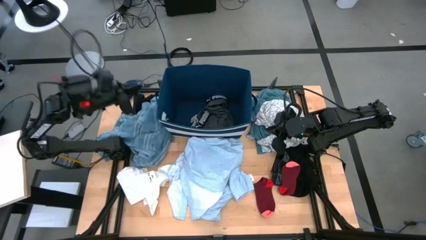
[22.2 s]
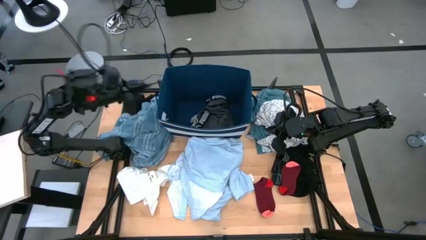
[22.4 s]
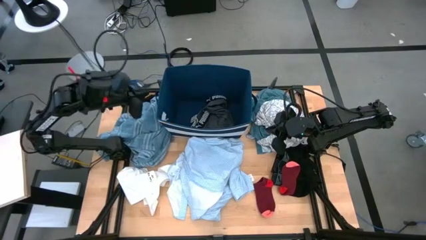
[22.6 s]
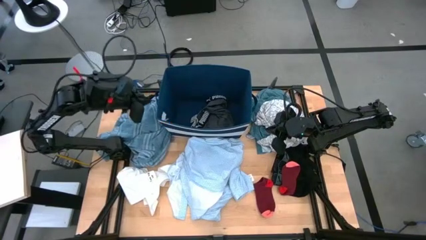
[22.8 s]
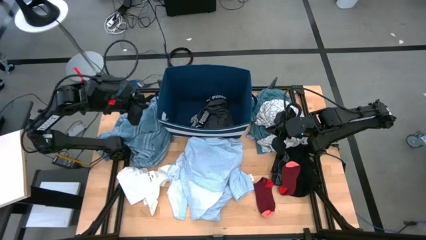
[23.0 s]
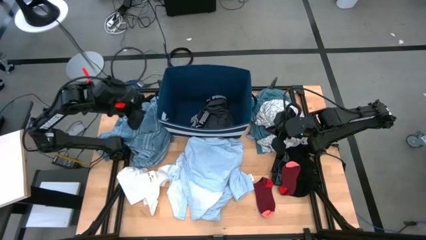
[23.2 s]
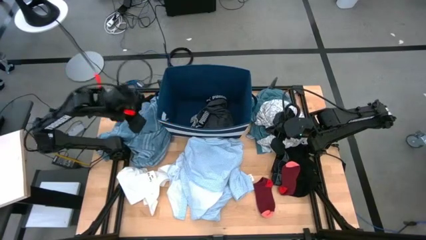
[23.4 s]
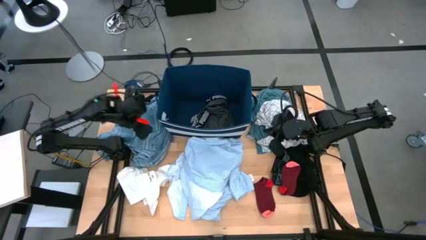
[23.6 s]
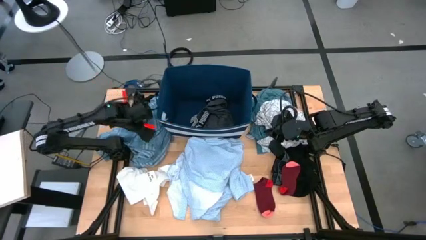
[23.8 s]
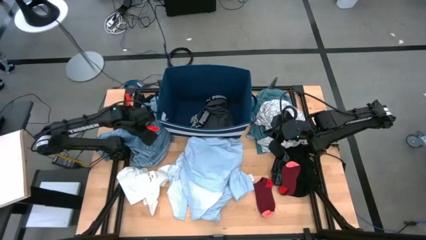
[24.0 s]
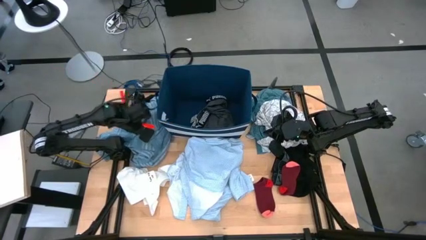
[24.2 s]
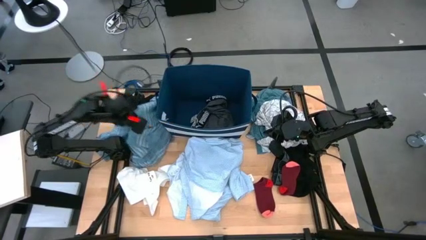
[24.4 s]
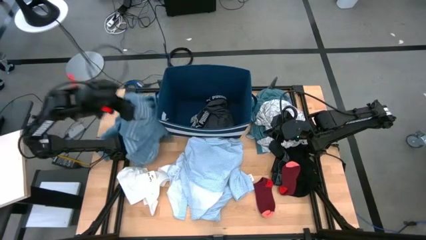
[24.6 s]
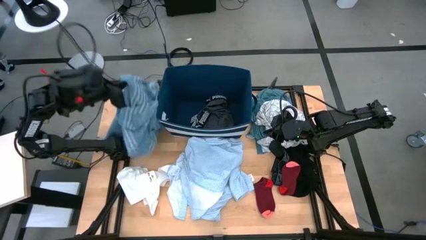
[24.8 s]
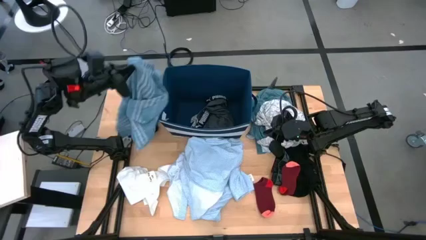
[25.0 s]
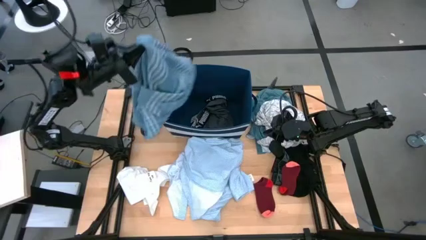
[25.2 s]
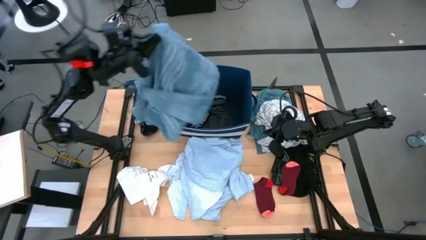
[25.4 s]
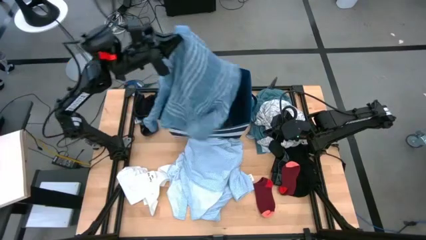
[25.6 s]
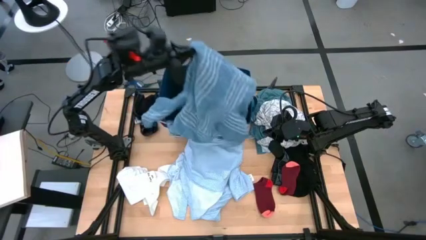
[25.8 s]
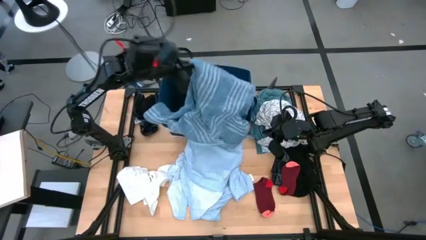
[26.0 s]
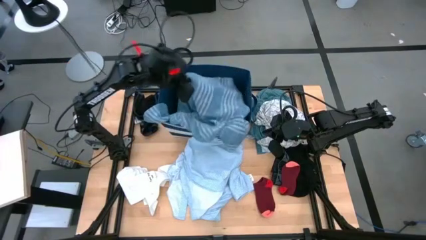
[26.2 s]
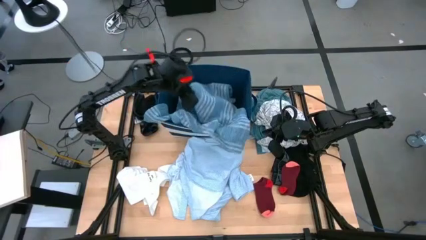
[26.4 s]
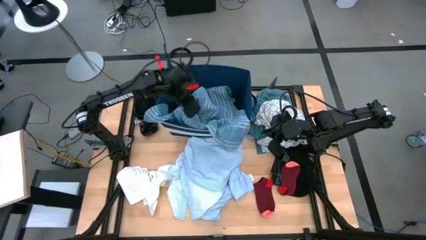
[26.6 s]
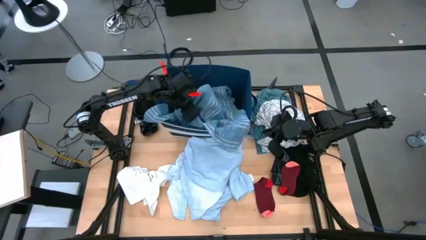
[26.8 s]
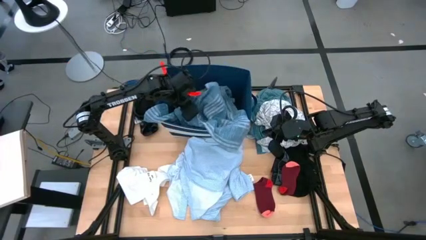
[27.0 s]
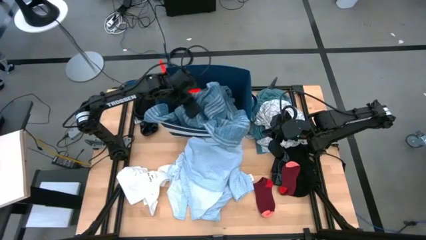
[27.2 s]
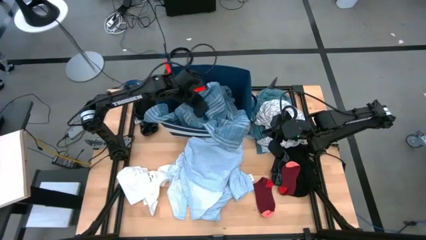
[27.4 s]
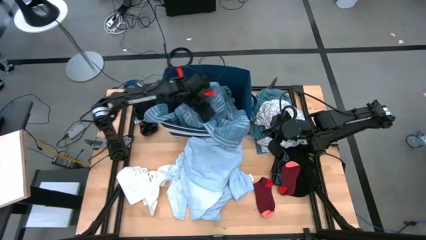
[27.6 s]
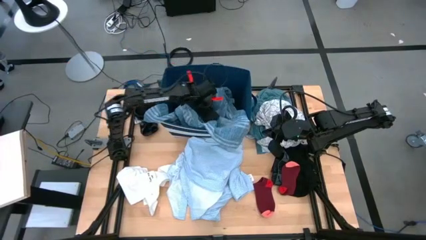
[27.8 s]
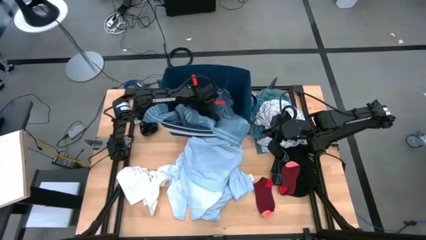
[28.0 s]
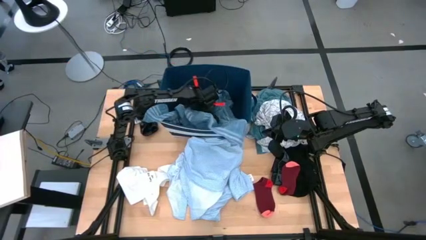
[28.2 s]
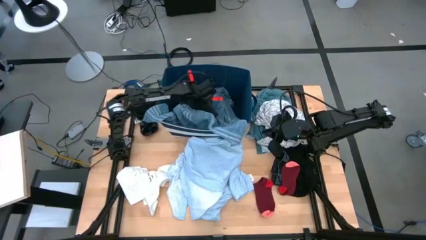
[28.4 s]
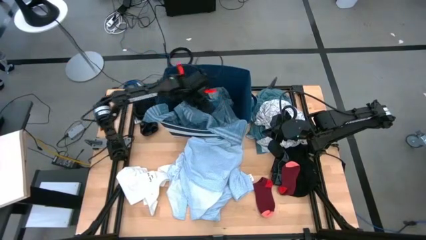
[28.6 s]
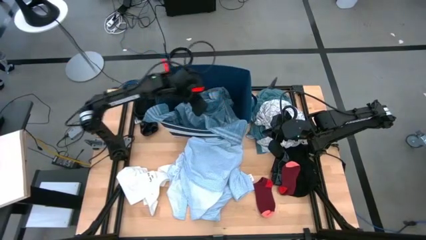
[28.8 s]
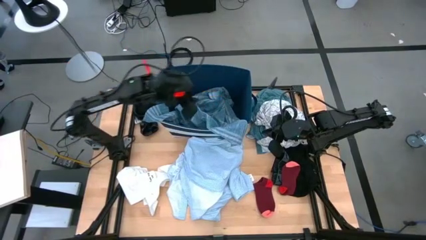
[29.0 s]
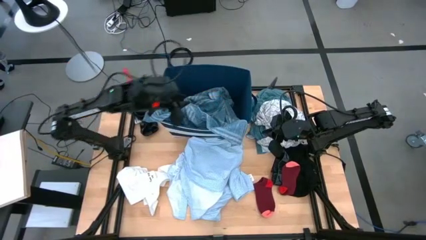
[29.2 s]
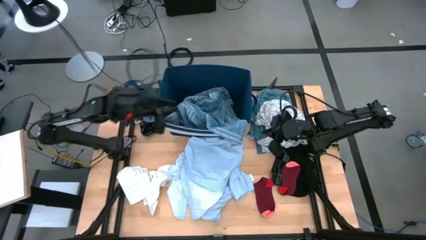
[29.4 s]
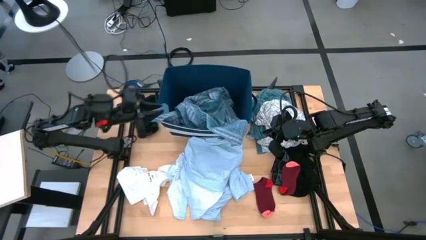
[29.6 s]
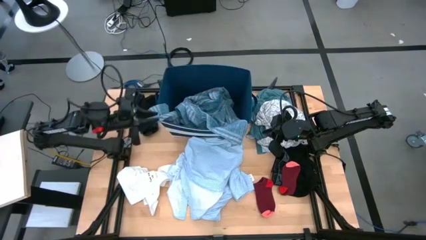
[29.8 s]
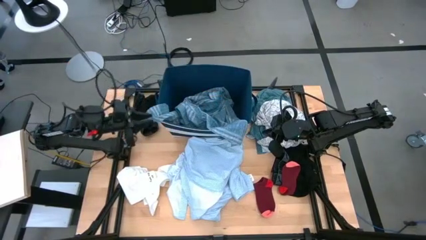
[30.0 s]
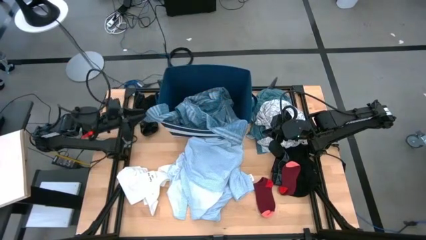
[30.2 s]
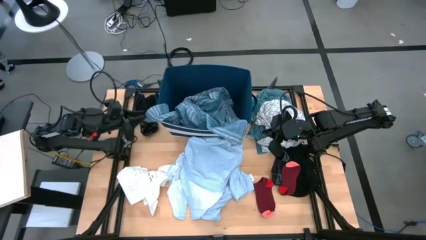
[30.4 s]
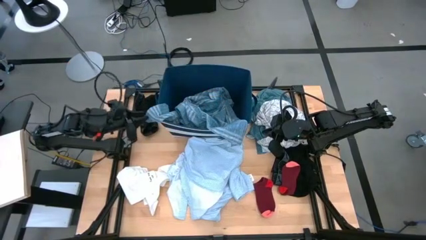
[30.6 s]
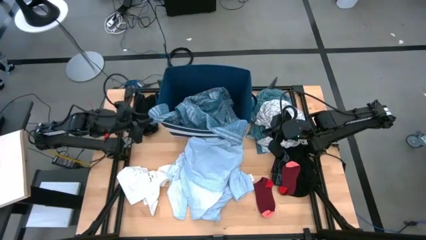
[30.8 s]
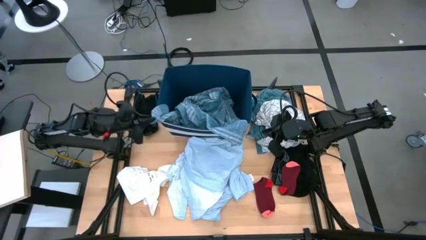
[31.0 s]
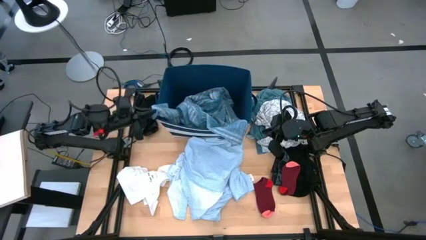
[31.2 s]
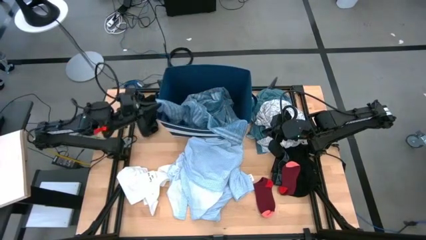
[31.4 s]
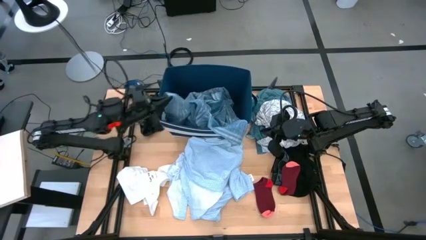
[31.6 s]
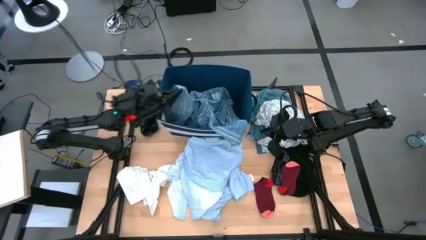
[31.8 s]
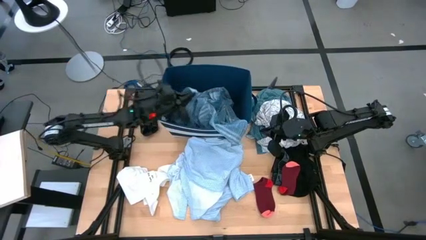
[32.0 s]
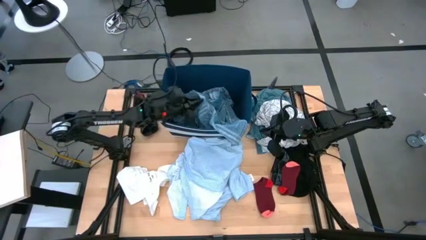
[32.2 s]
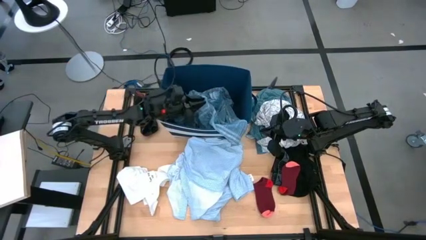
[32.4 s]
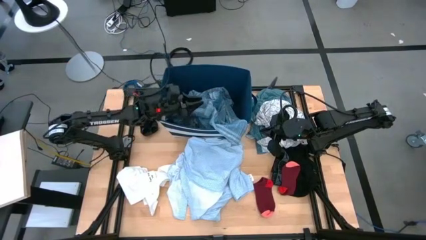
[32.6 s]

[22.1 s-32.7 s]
Task: Sort clothes
Put the blue shirt into the bin

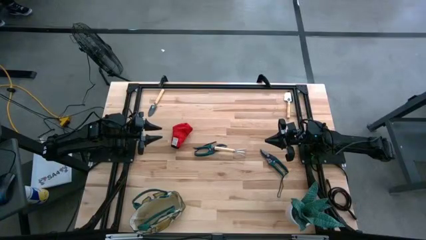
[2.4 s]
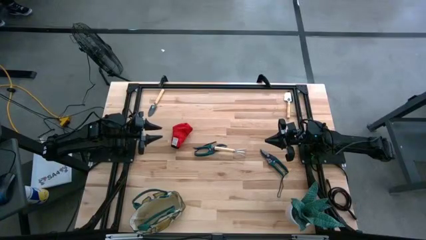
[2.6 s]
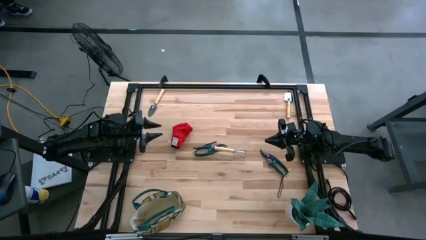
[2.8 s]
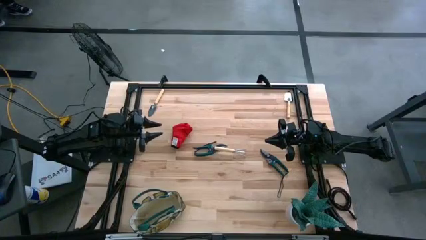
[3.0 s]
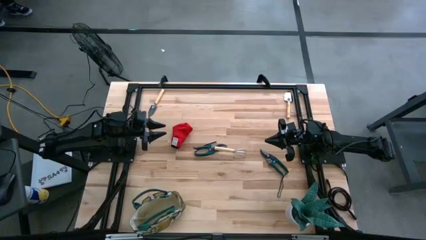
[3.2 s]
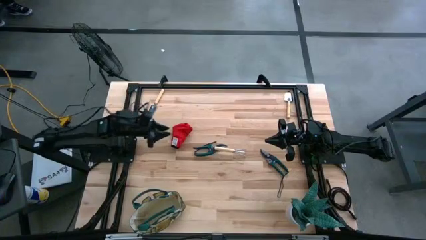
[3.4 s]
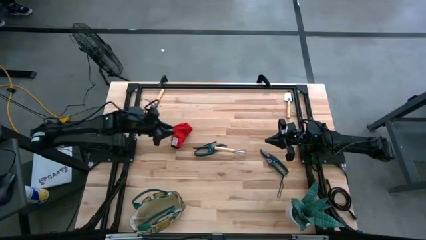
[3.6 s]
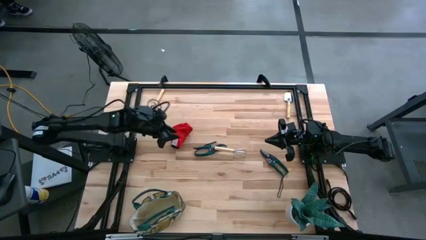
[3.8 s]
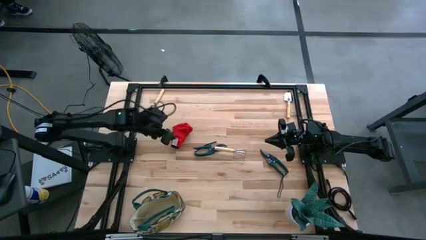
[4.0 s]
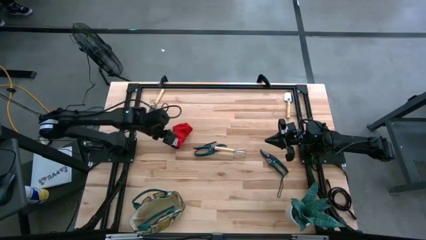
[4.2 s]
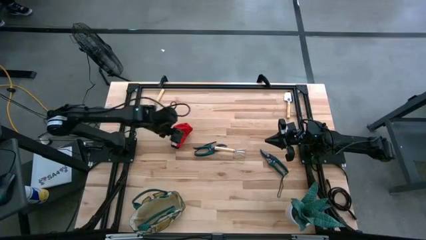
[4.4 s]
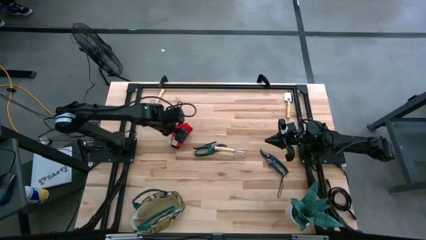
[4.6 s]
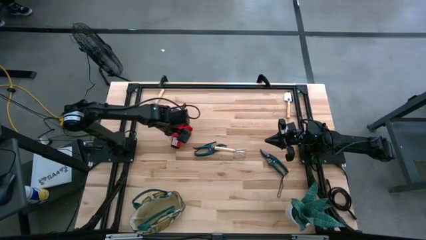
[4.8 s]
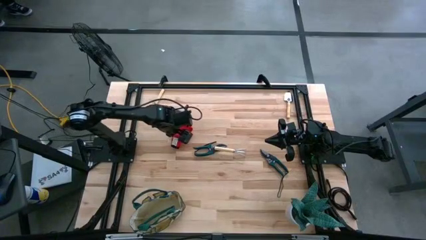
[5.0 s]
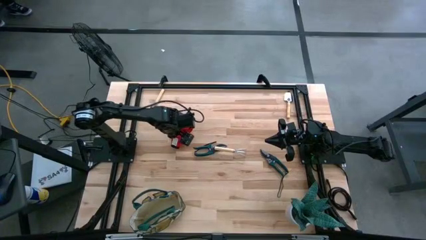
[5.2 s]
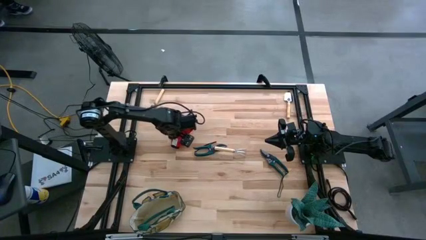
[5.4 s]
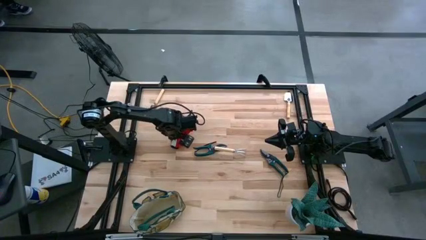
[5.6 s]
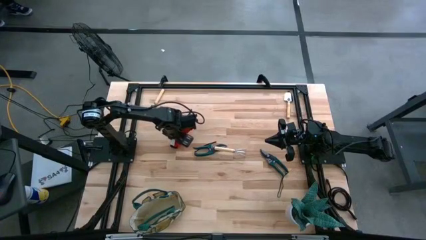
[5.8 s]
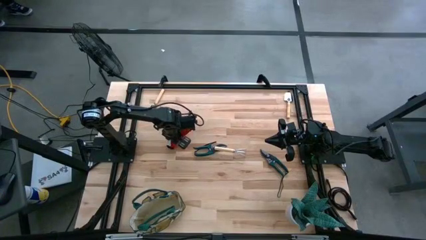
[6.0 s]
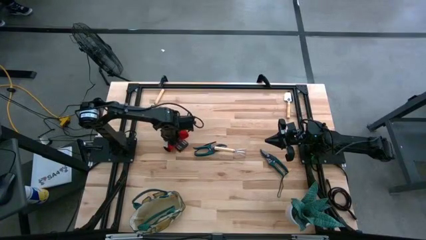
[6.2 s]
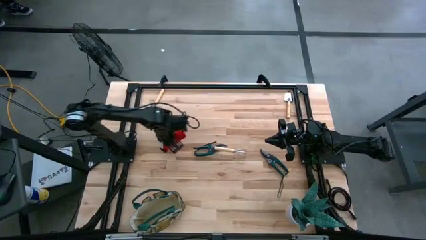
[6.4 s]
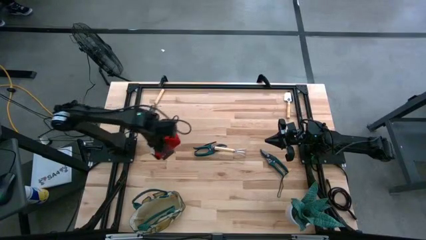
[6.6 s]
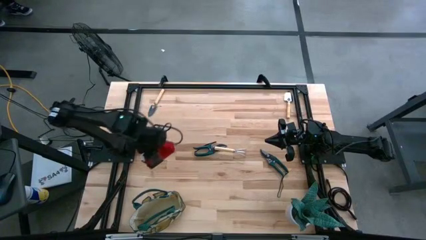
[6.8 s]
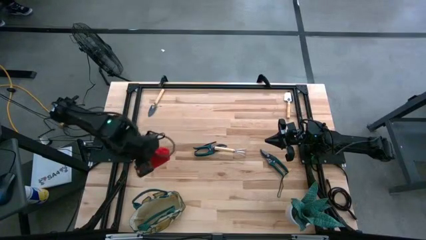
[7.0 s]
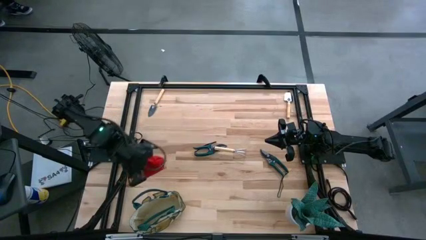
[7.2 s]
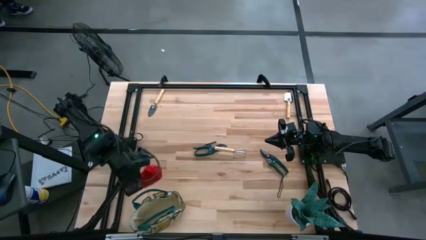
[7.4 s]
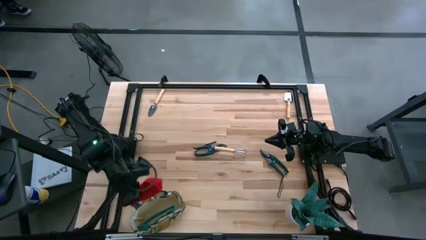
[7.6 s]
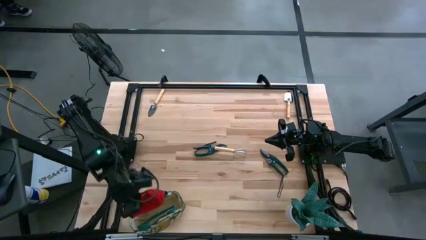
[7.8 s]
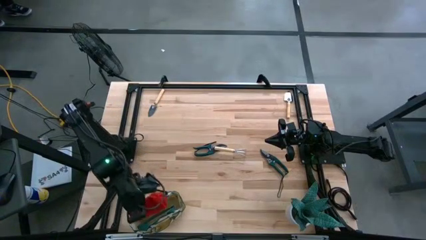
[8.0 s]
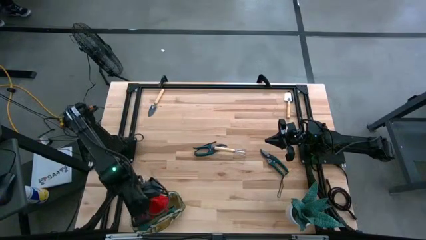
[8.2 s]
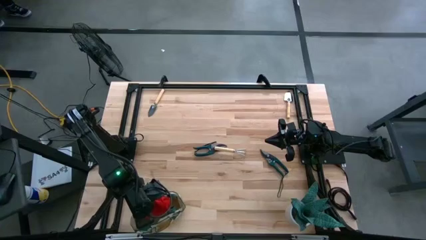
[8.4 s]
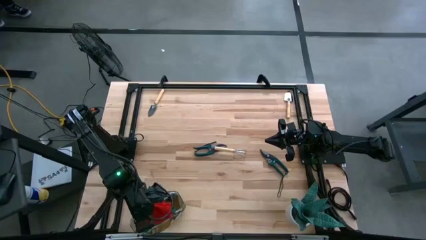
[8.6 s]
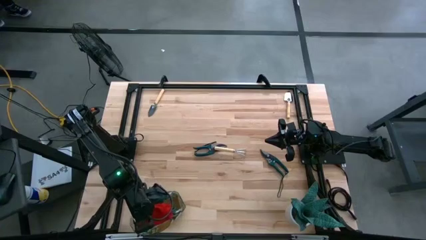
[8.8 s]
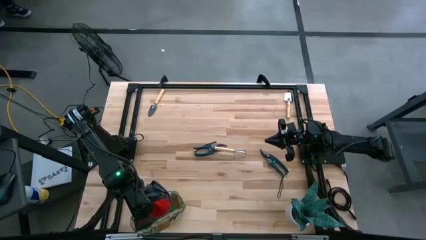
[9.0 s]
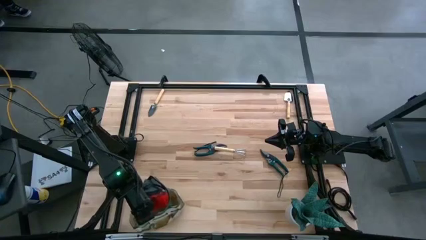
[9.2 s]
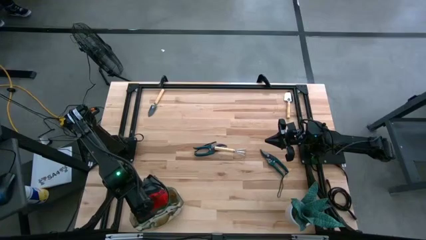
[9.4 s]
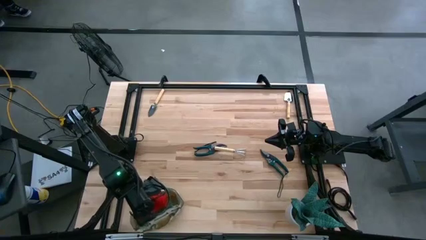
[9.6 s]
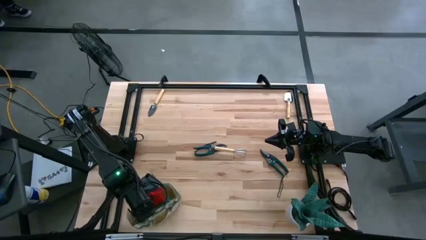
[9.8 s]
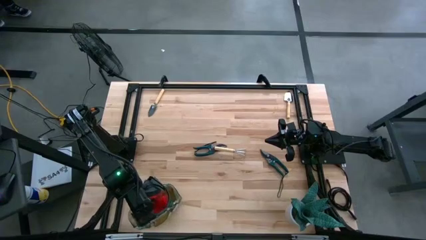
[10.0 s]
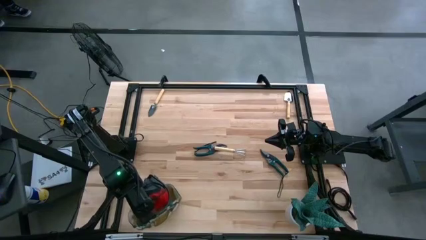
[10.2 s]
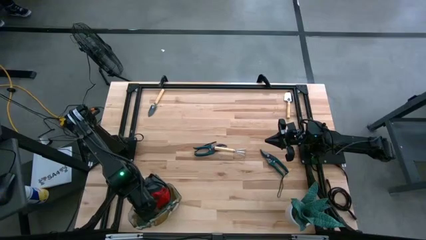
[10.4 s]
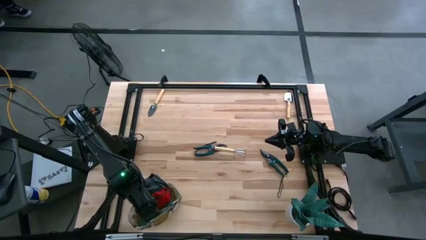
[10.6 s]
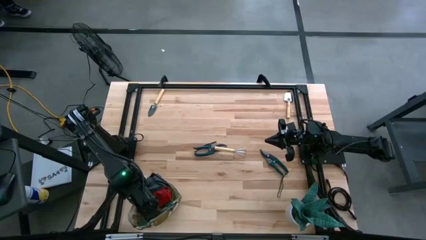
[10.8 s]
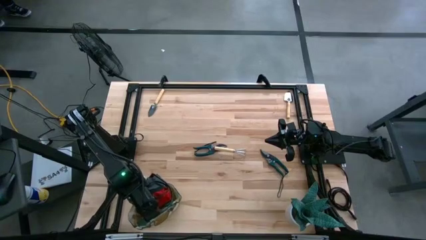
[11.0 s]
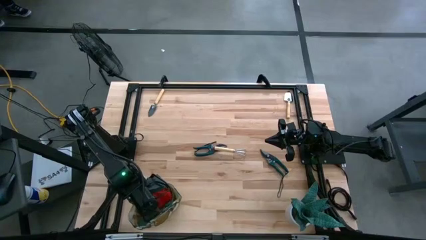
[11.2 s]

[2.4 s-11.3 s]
Task: Pick & Place Garden tools in Gardening bag
Put the red gardening gloves into the white gardening bag
